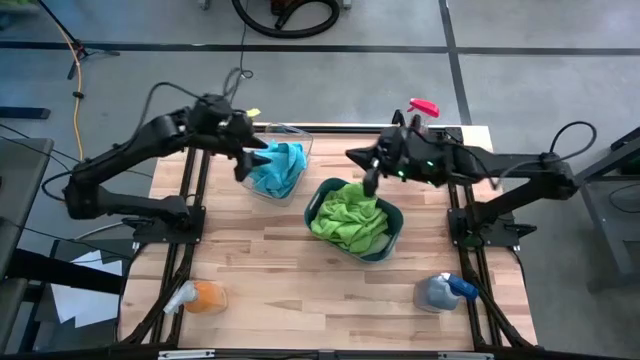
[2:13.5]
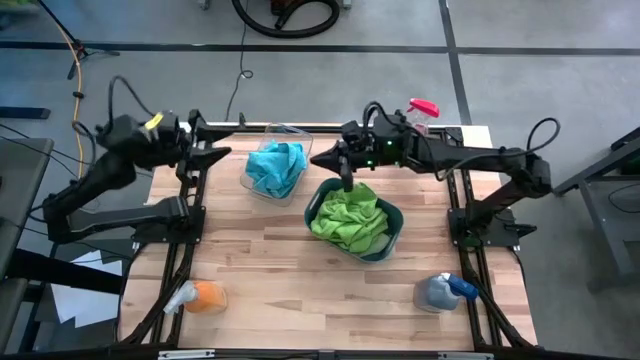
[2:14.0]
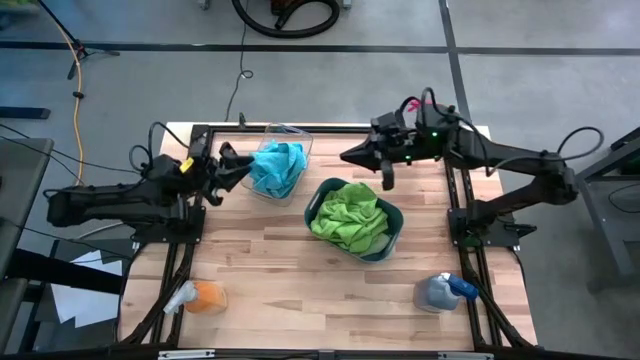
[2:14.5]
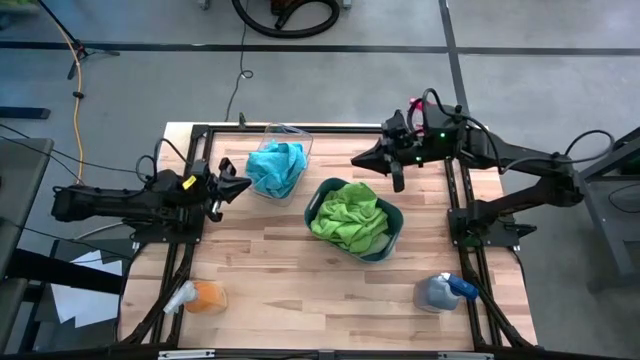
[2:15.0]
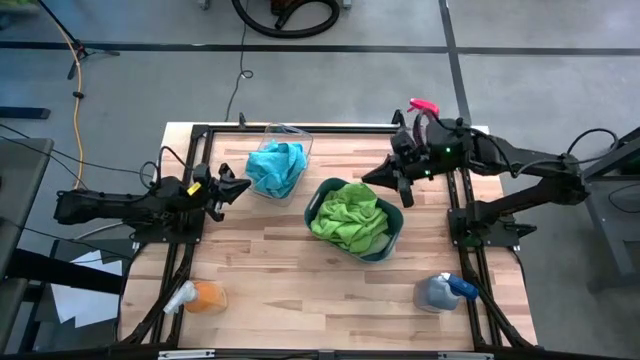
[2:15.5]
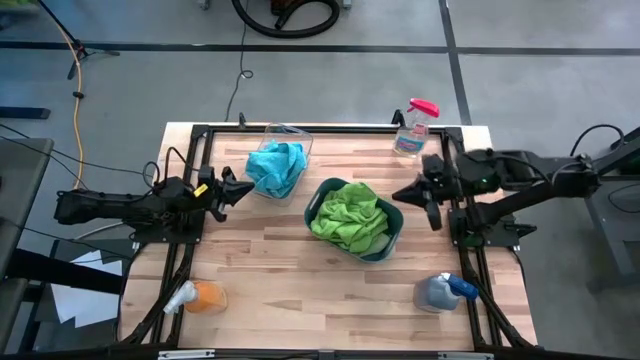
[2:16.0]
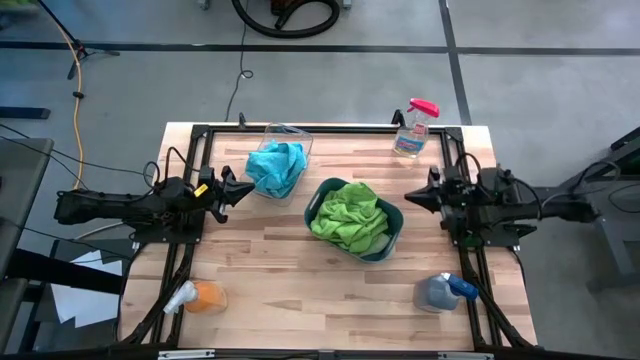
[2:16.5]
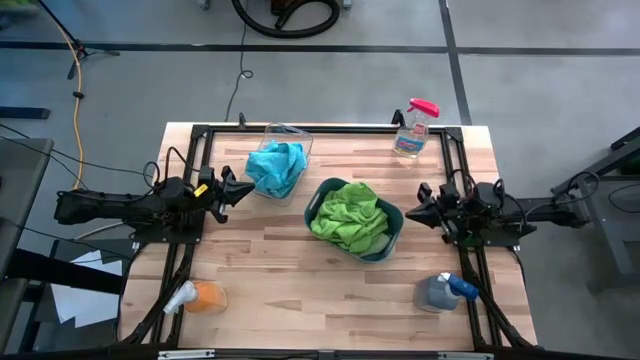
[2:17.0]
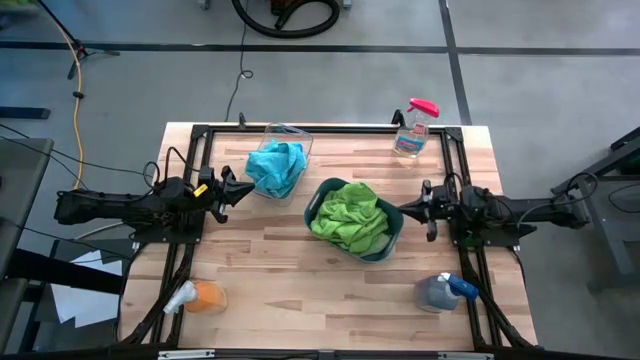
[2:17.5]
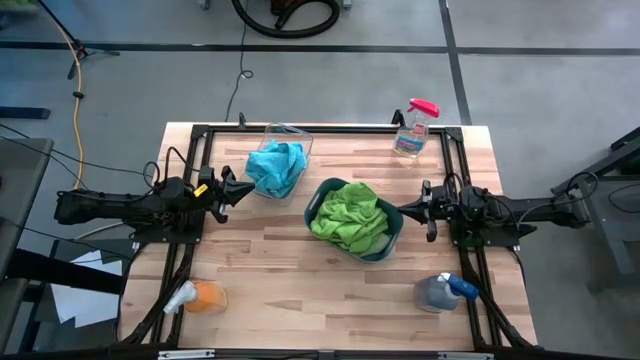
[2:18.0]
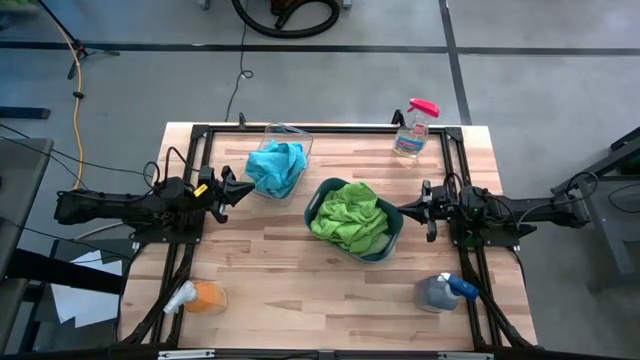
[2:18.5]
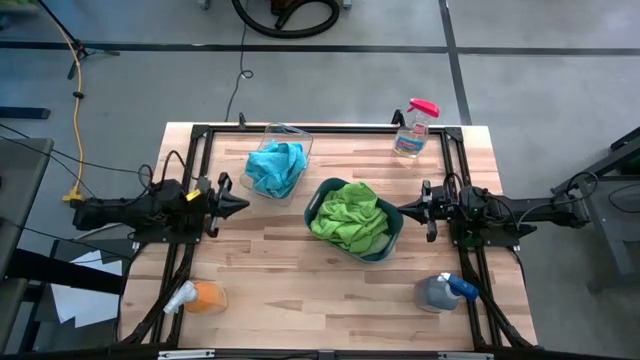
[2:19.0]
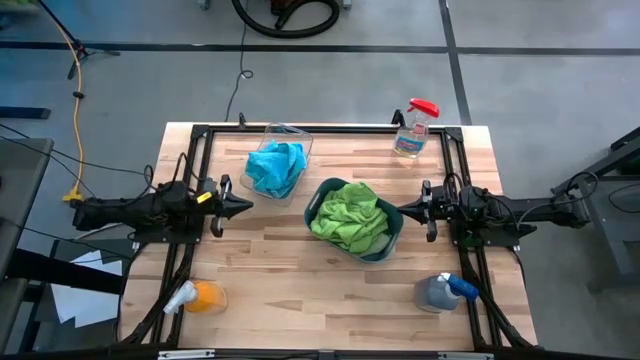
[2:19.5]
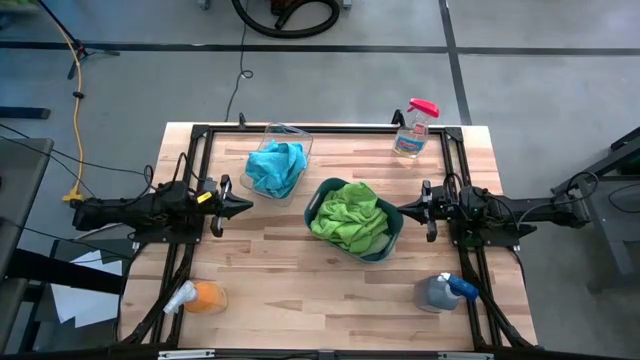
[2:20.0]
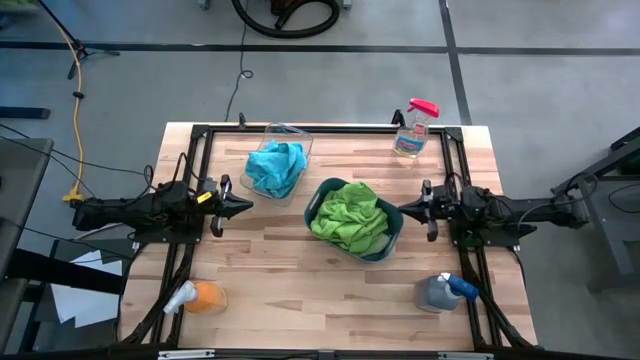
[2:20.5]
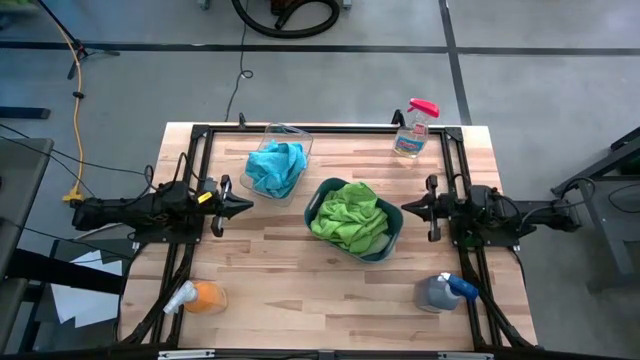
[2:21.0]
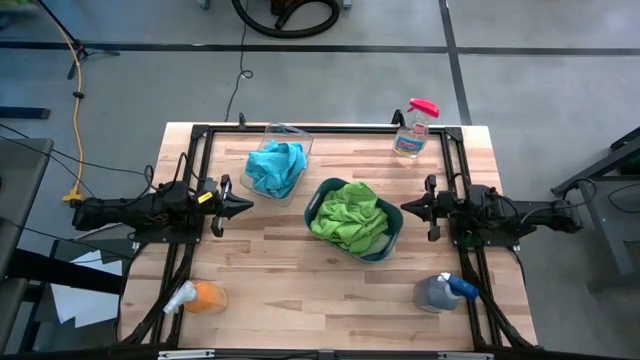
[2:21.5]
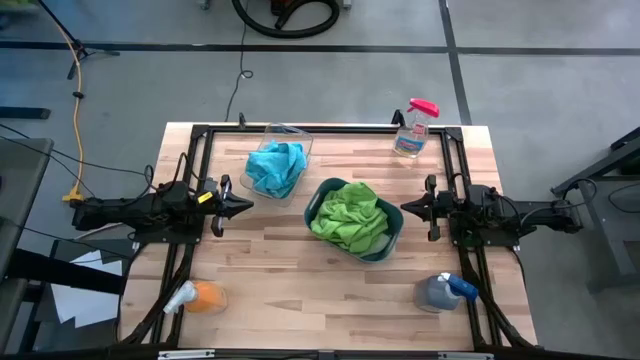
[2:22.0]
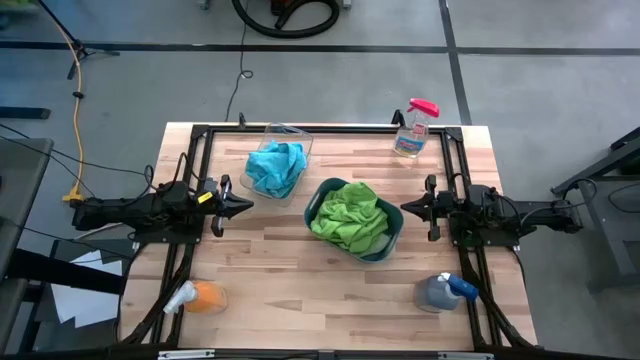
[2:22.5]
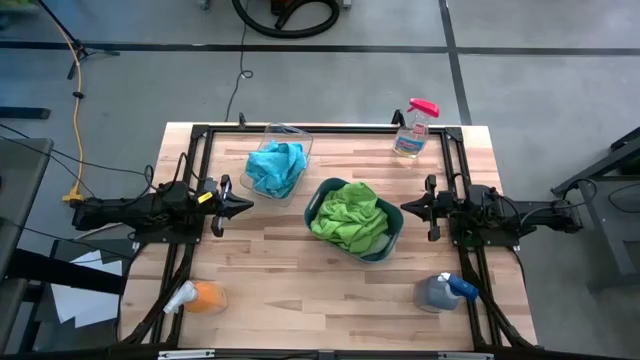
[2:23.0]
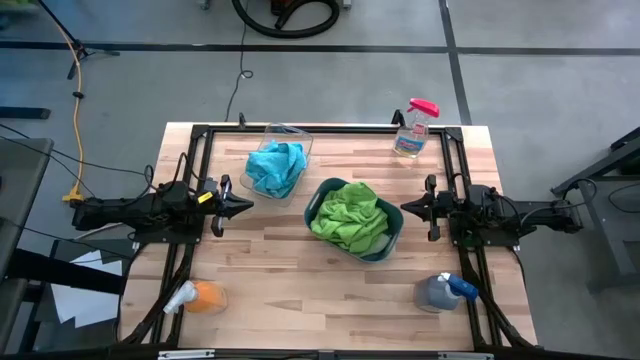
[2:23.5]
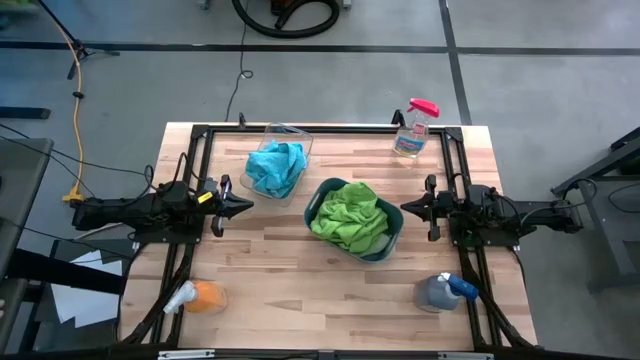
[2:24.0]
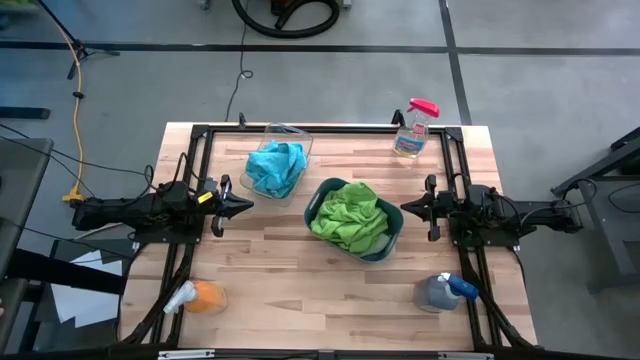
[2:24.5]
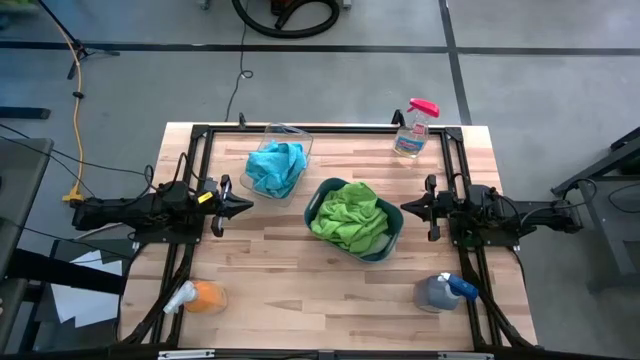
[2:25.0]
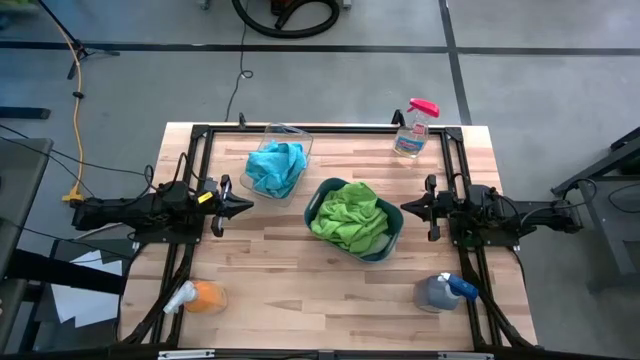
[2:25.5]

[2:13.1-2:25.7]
Task: Sort microfiber towel by color & place in baskets
Return to Home Position

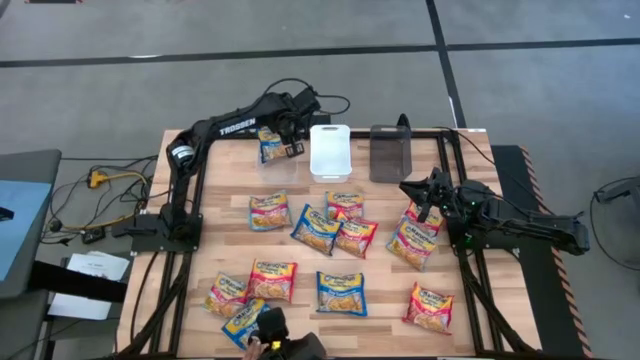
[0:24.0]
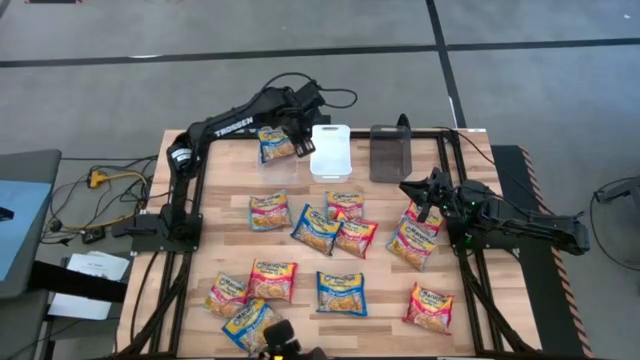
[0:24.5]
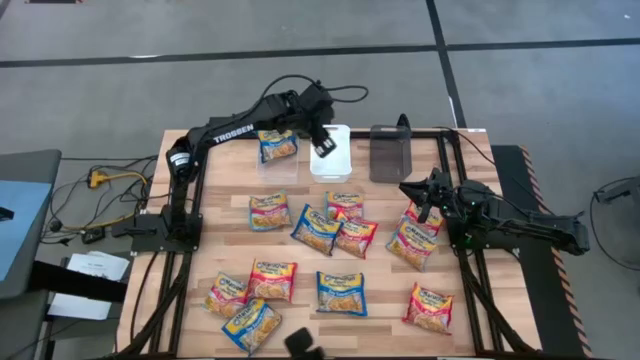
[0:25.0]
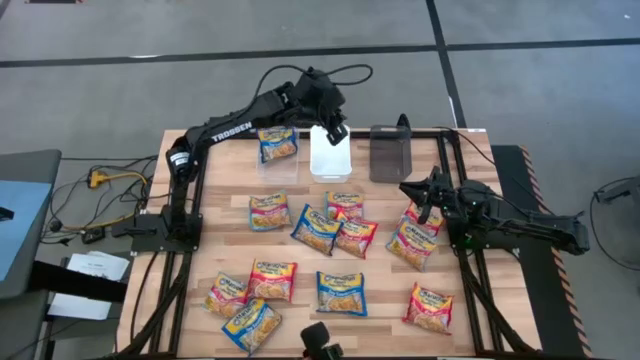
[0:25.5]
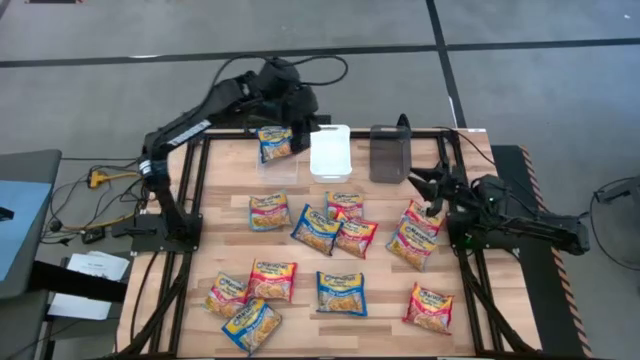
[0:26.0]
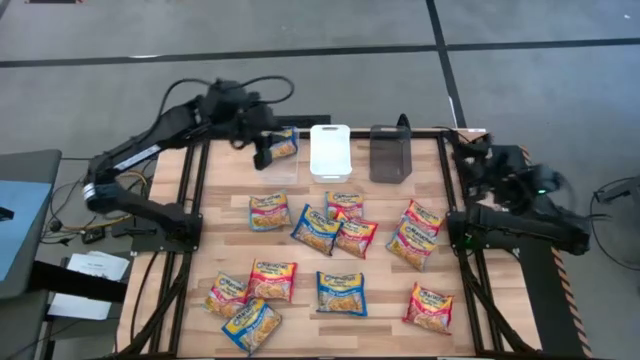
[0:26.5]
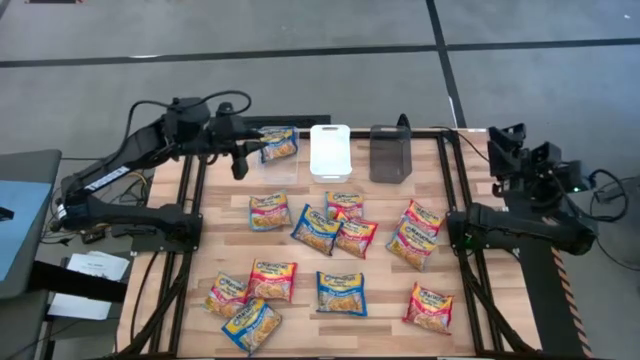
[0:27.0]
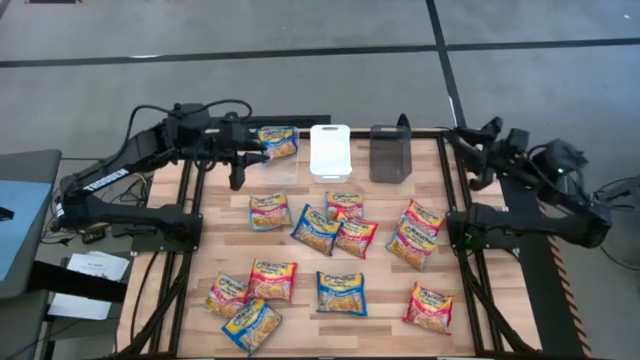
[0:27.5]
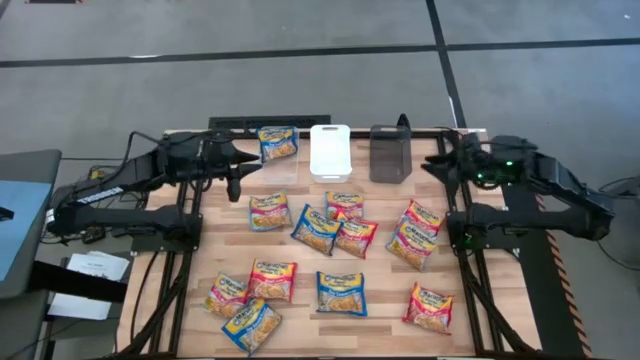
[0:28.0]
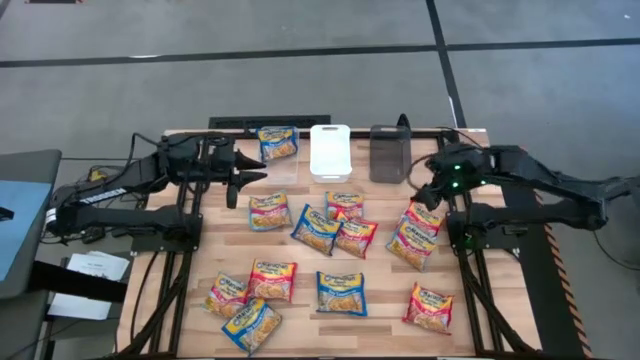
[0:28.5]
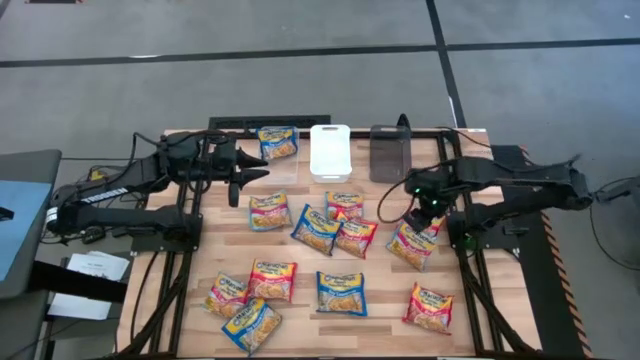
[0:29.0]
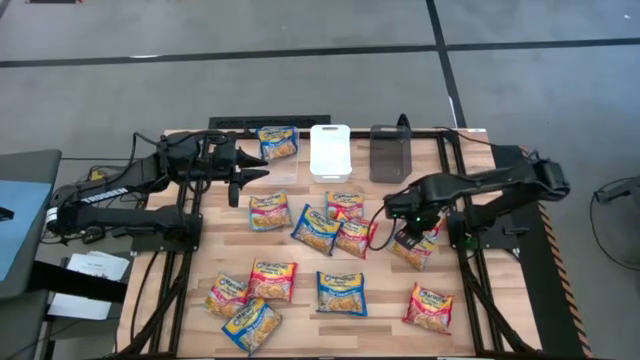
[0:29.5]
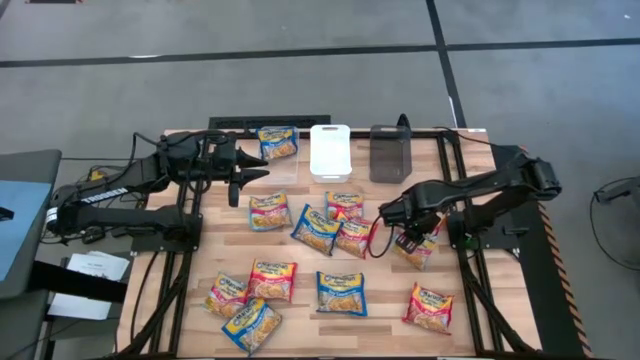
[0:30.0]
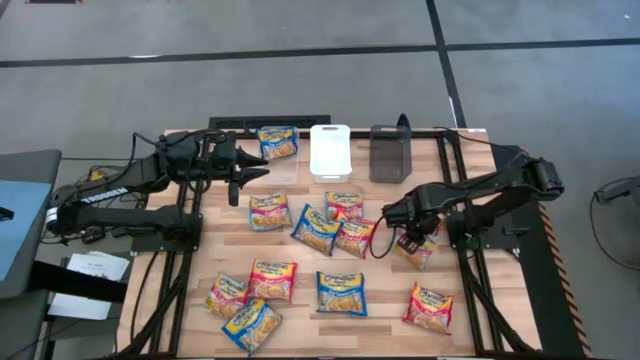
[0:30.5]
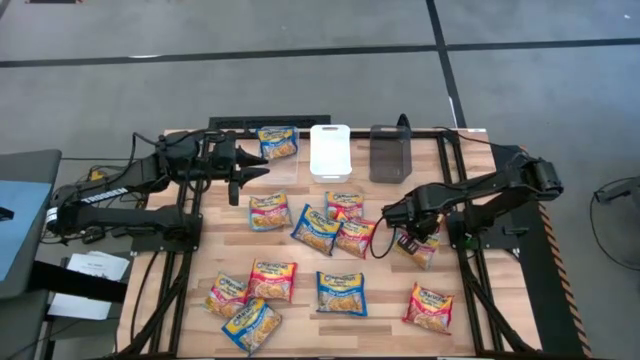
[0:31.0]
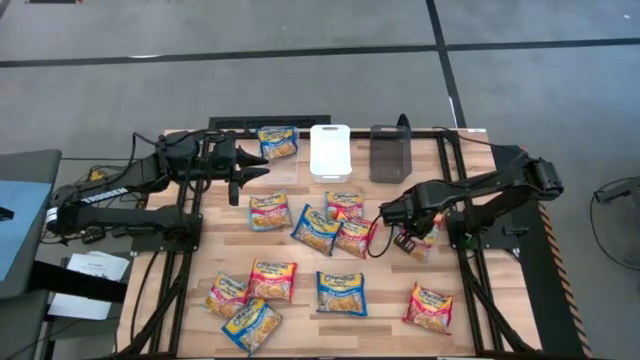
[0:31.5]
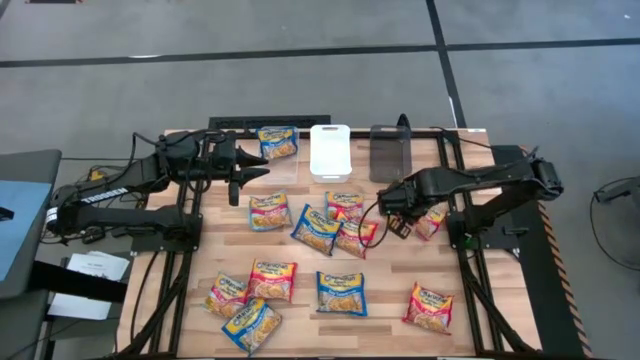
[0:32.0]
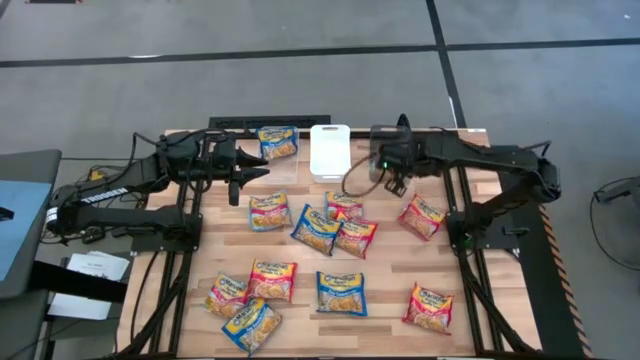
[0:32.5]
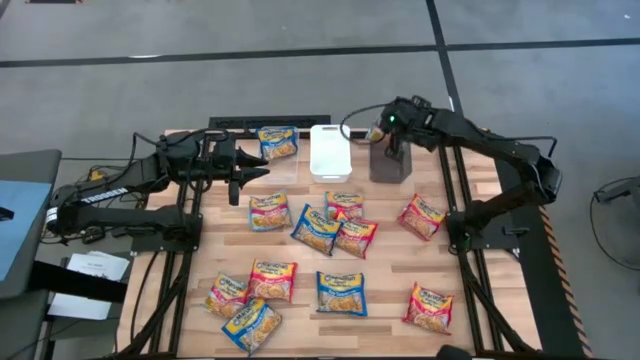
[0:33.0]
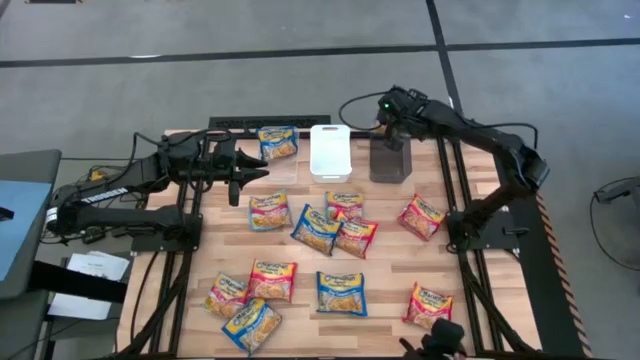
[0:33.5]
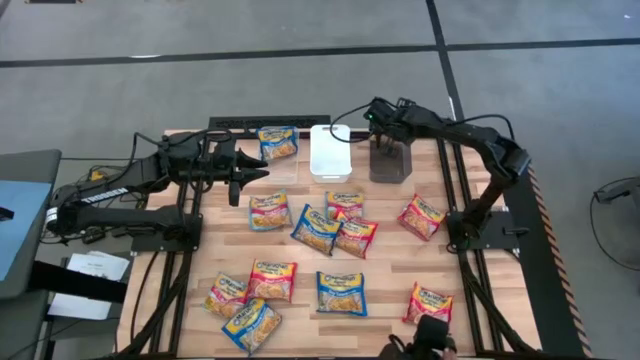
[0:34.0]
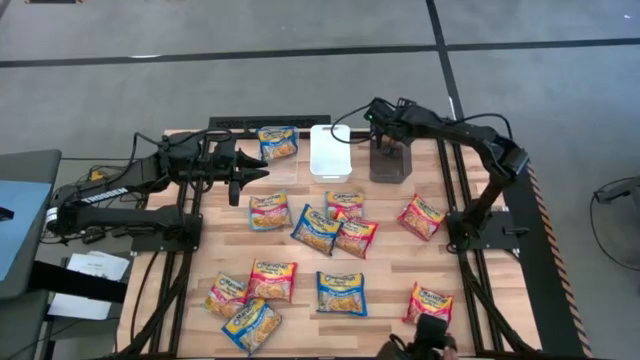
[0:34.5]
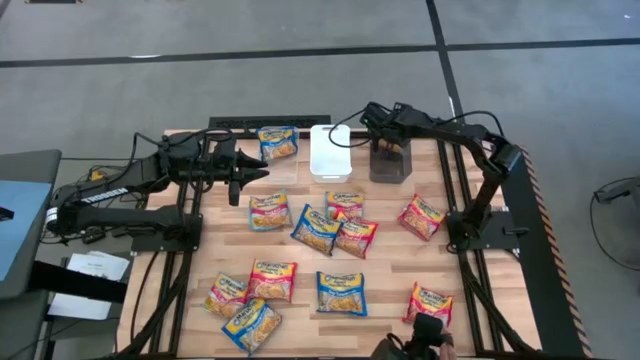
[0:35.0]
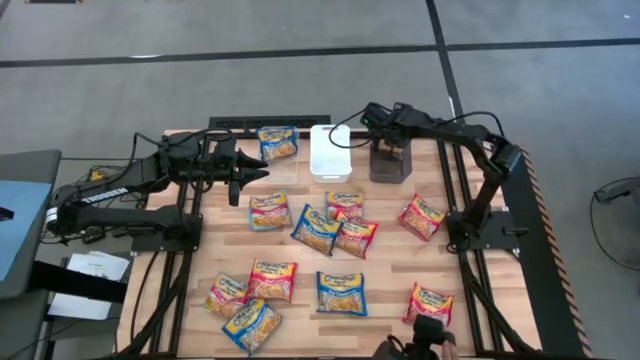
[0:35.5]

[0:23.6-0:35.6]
Task: Sort Maruchan noodles
Put the light blue noodle pack into the black bin
